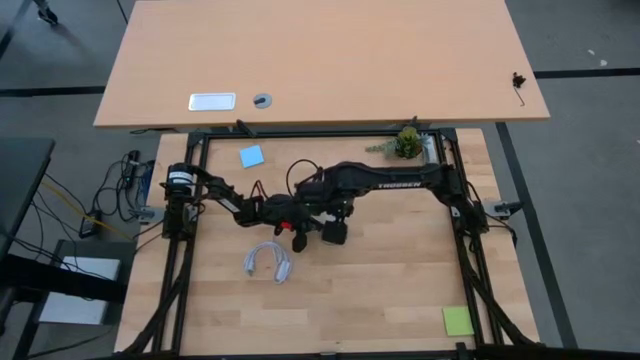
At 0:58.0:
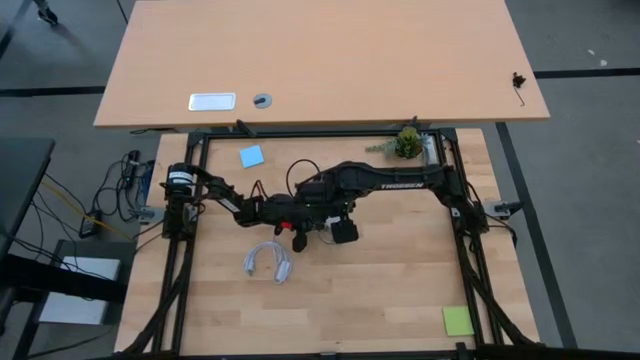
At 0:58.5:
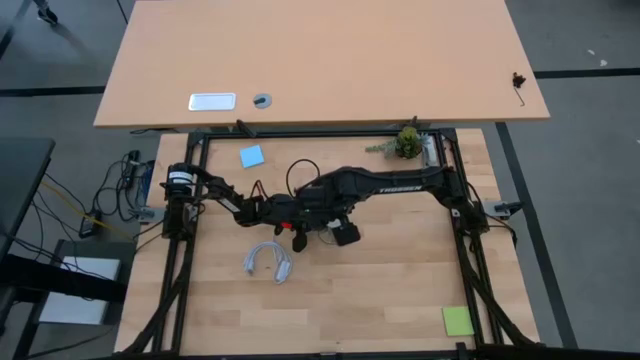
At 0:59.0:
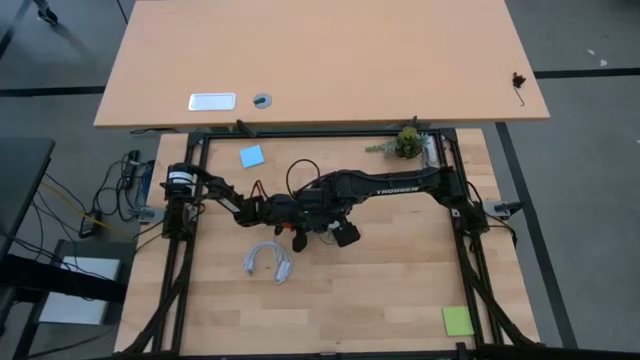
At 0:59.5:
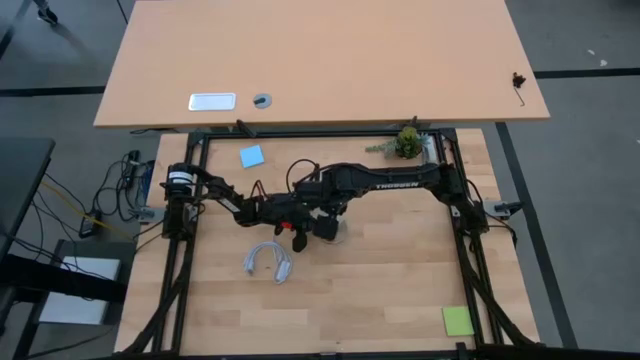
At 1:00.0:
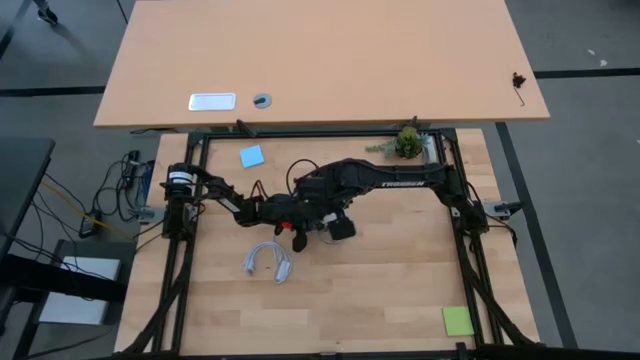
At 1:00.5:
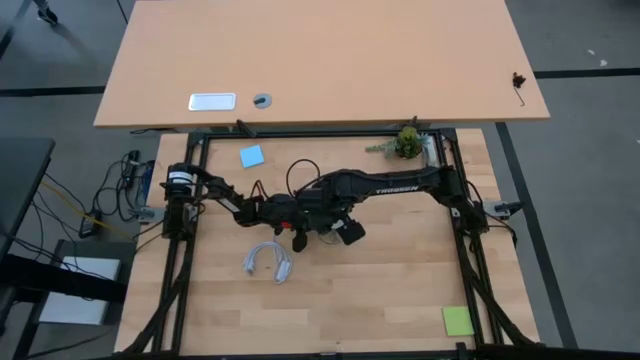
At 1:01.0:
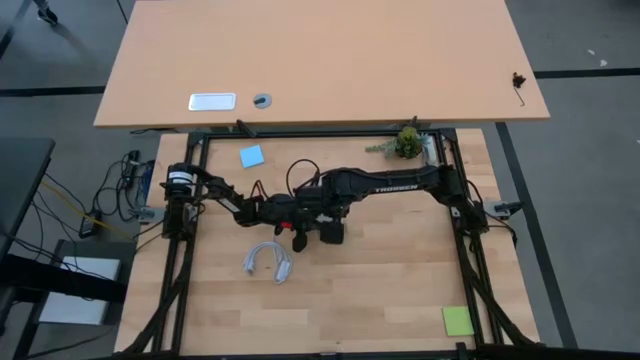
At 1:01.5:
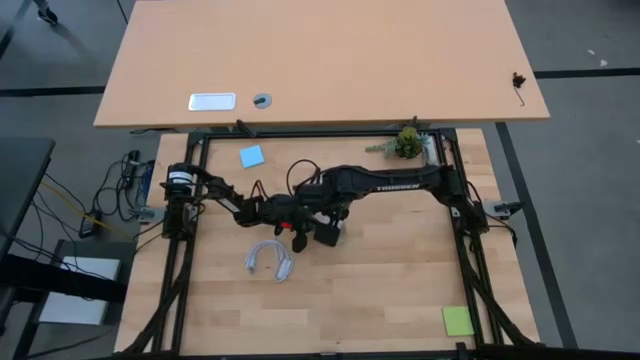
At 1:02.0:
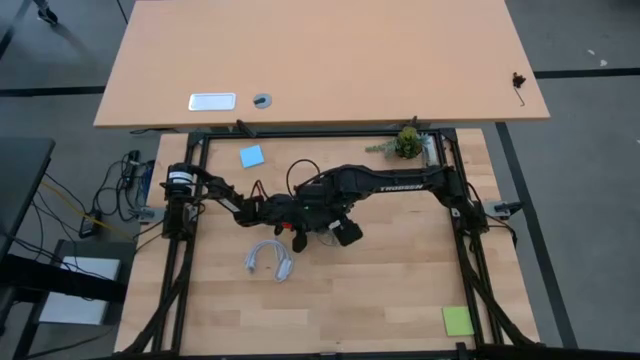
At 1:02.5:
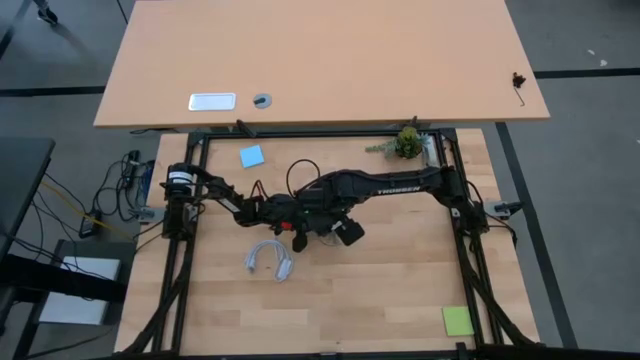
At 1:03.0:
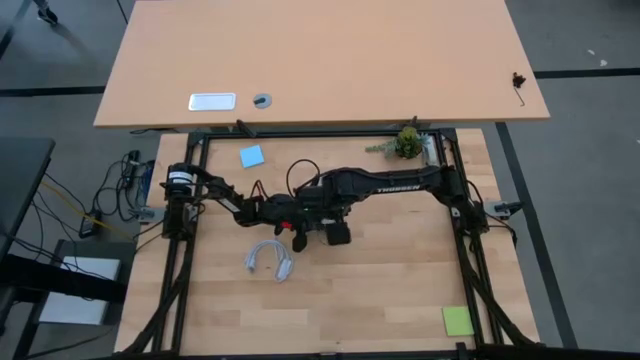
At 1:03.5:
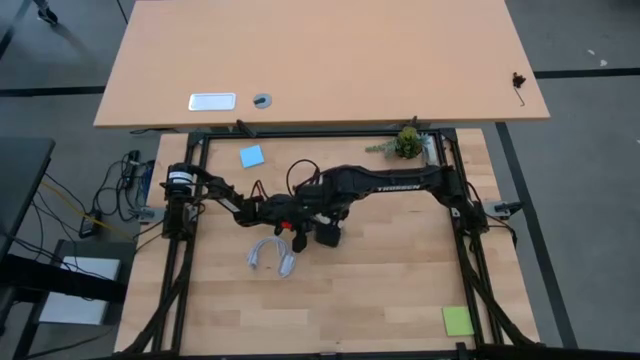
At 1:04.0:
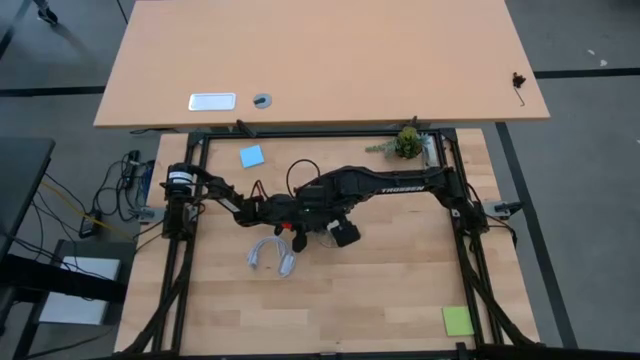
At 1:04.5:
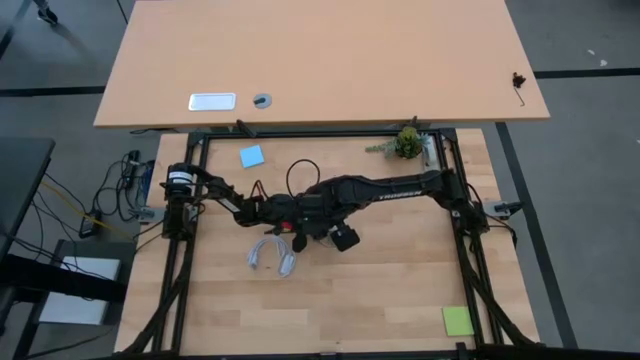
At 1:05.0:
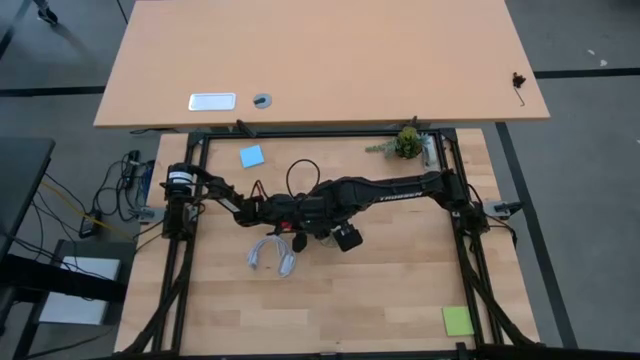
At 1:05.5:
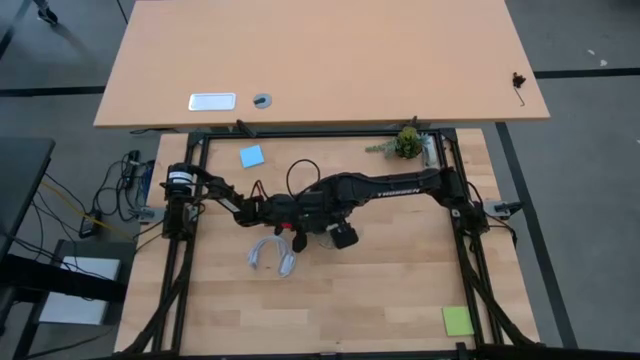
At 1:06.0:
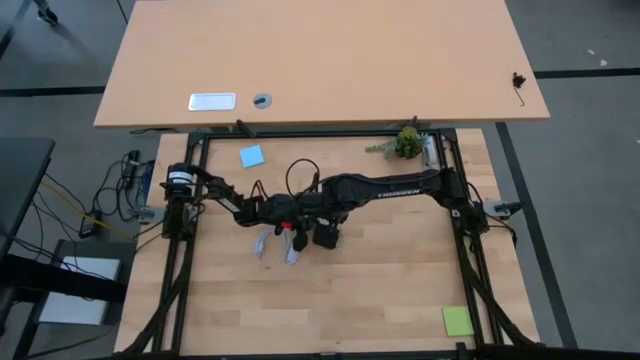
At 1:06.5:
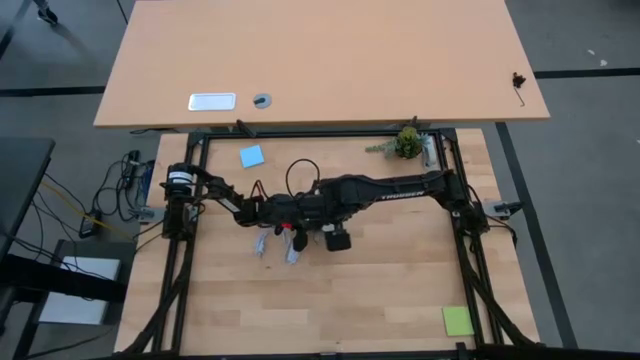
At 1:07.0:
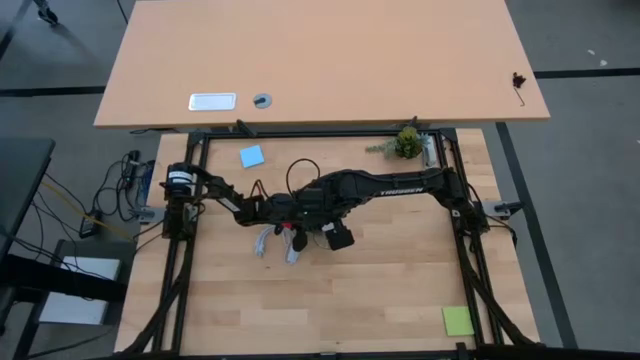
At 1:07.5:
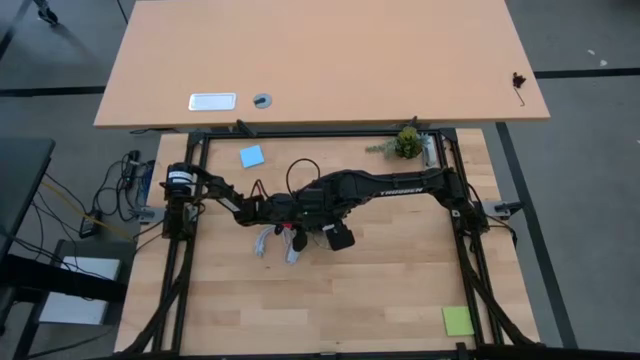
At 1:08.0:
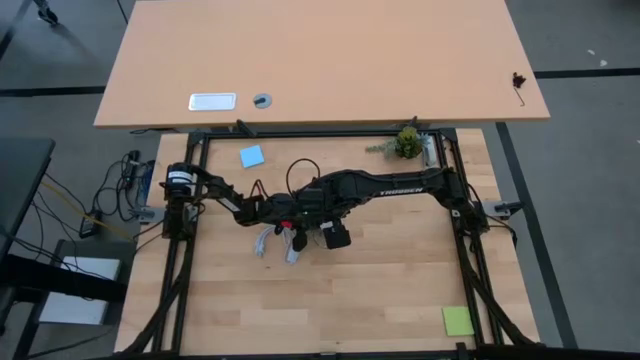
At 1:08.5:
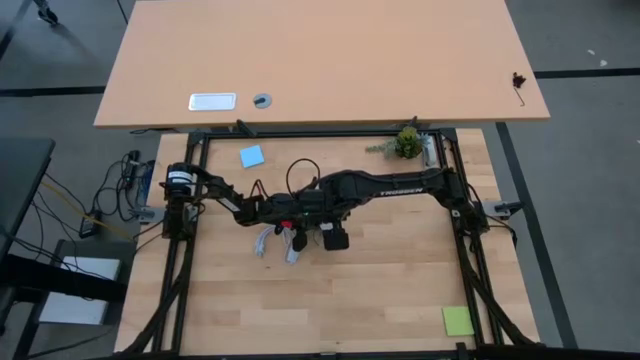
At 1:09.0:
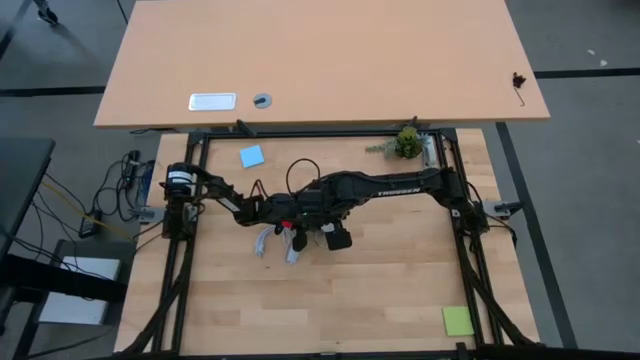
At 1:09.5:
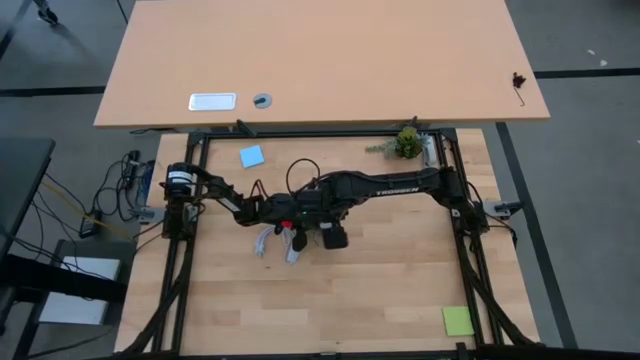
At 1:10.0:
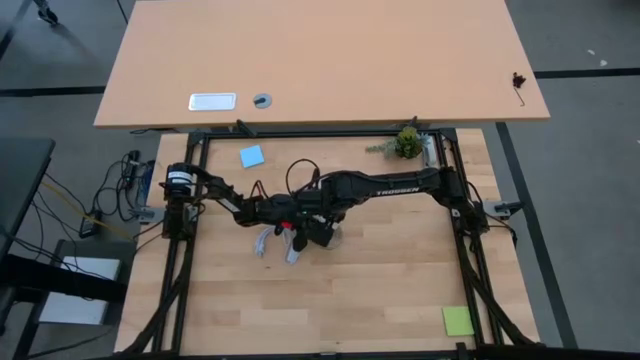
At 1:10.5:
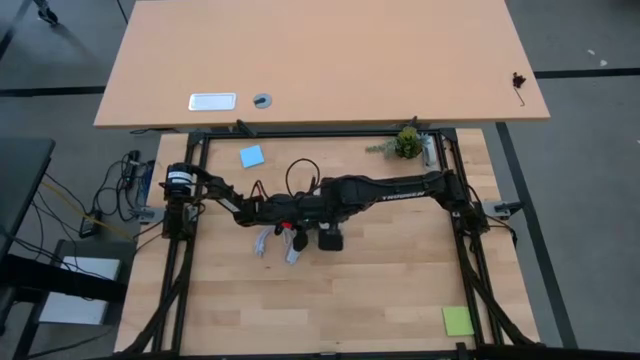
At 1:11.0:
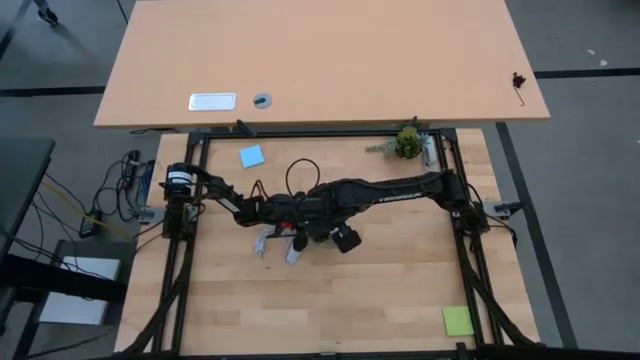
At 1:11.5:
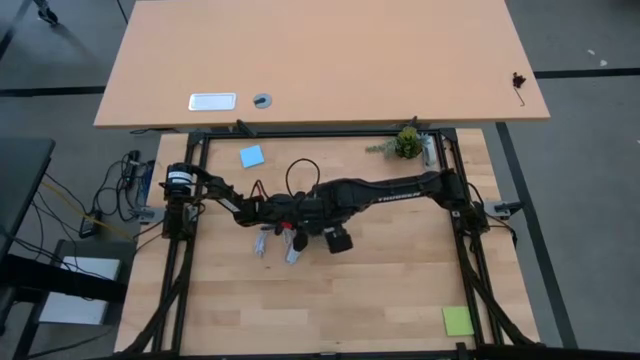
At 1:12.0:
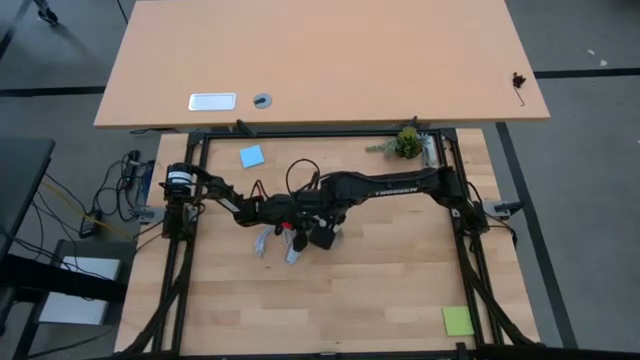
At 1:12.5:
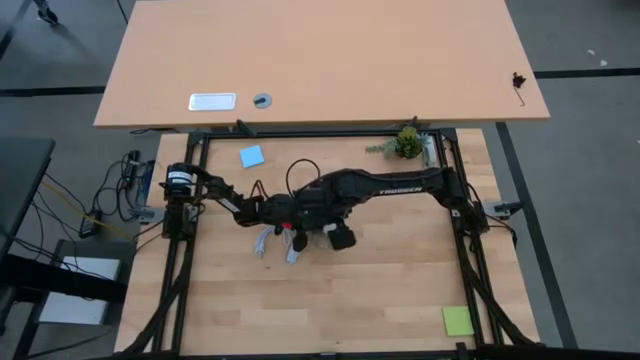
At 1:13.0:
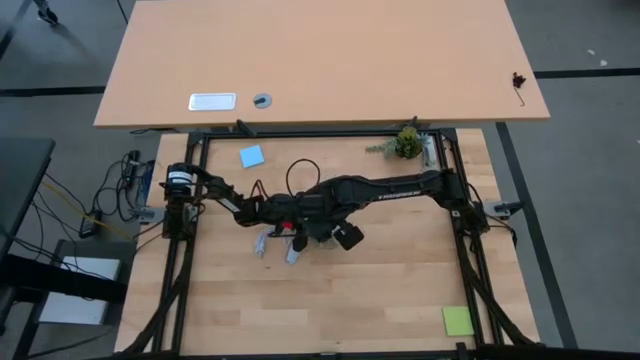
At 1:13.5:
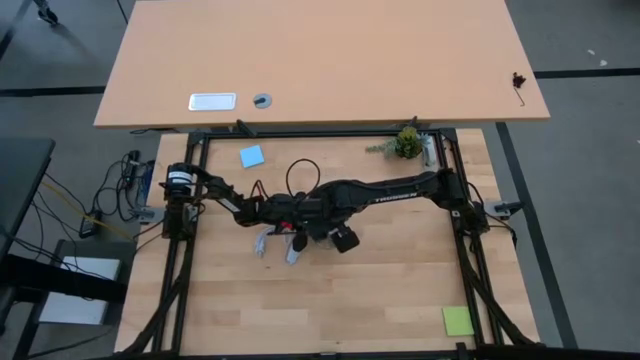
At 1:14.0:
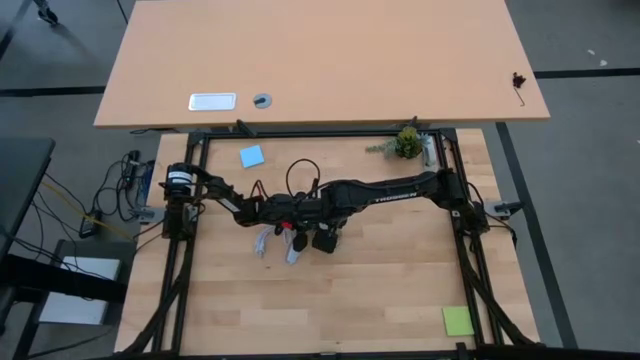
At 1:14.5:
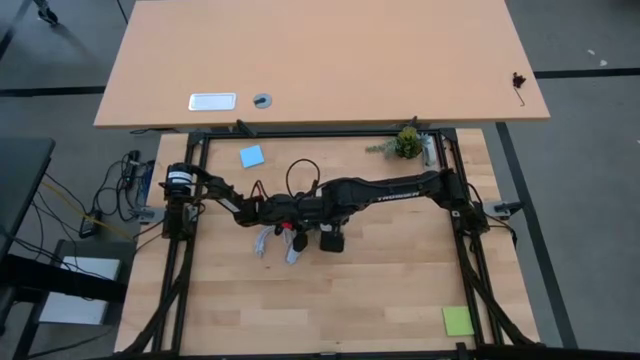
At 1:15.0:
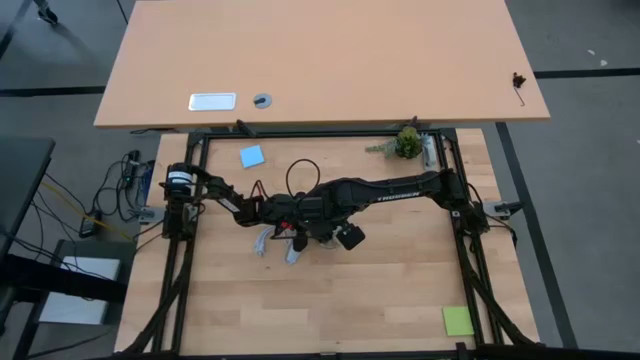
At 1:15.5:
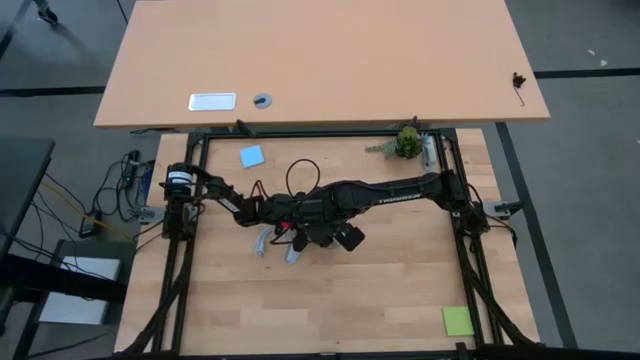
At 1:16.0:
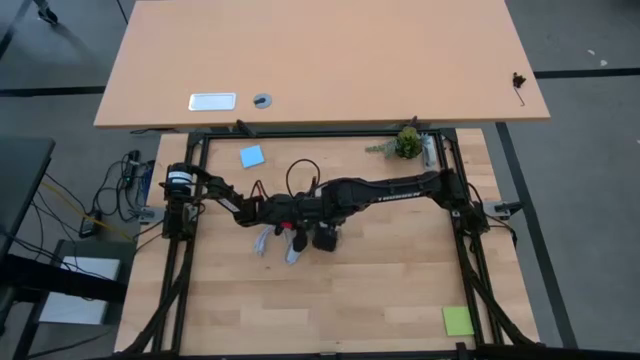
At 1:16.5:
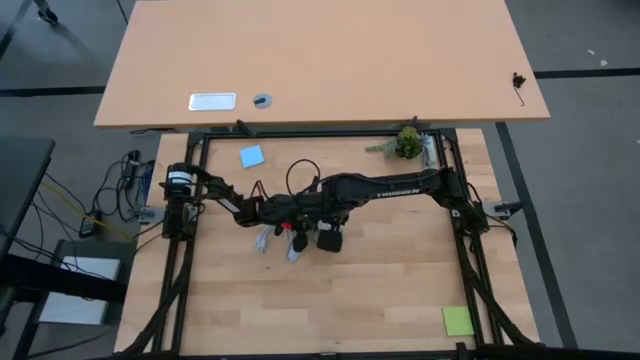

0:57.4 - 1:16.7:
Task: Screw lightbulb
Insert the light bulb into the lamp
